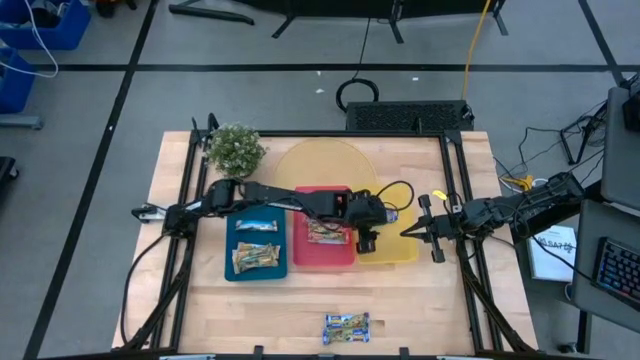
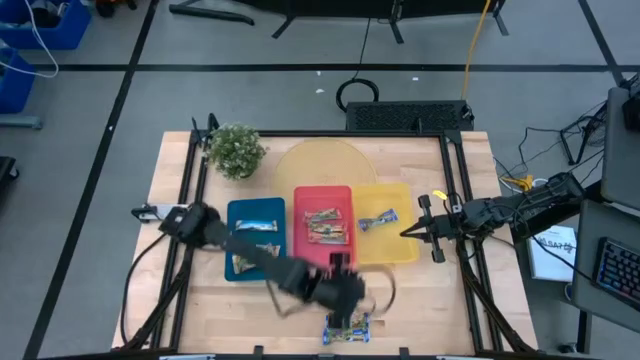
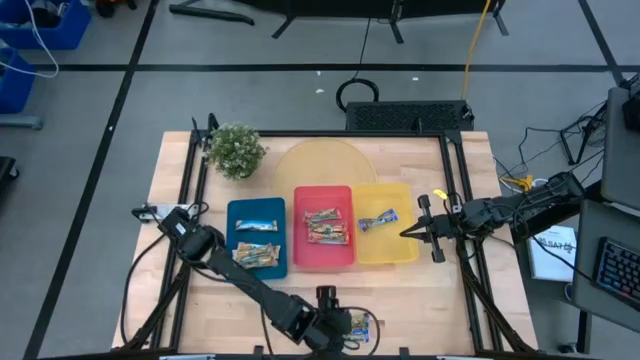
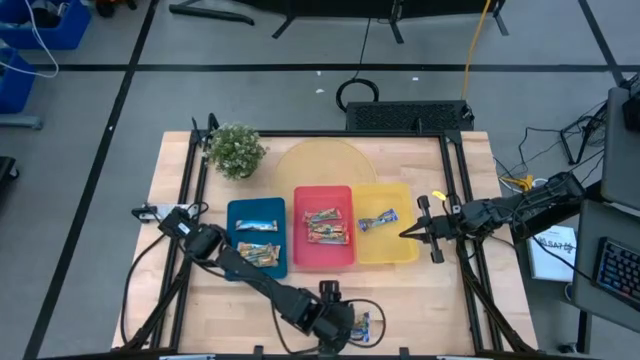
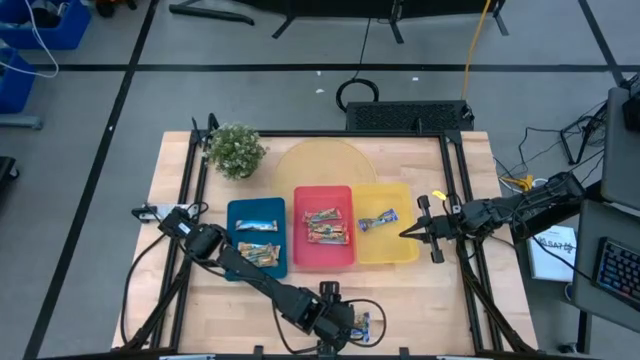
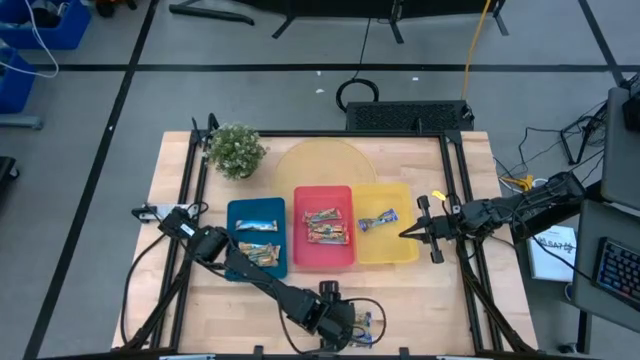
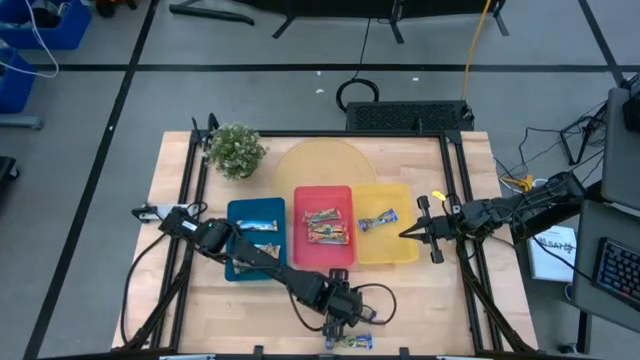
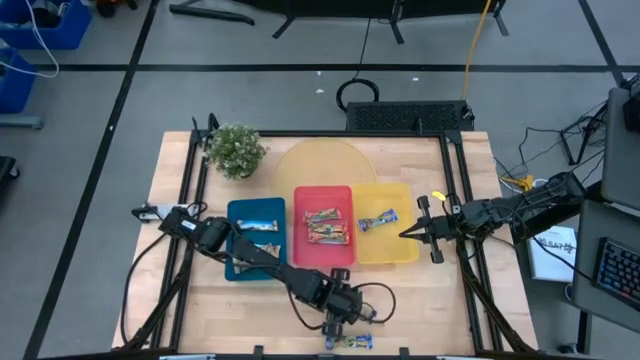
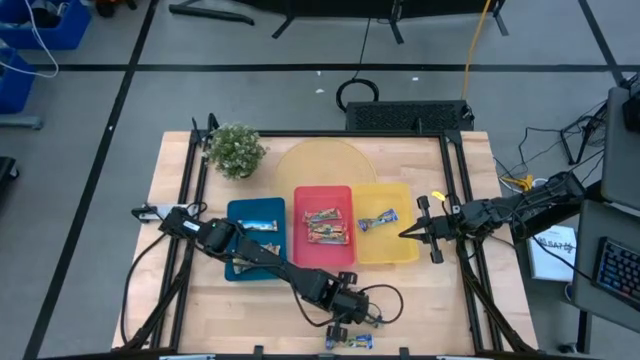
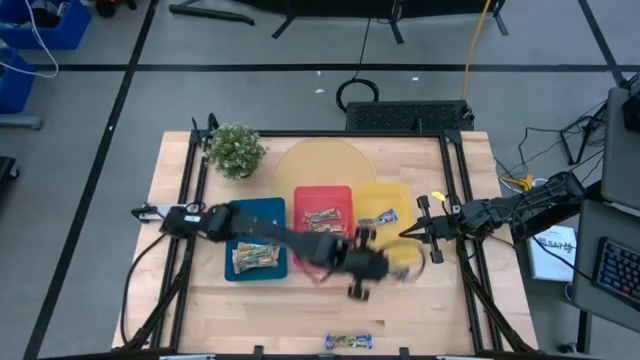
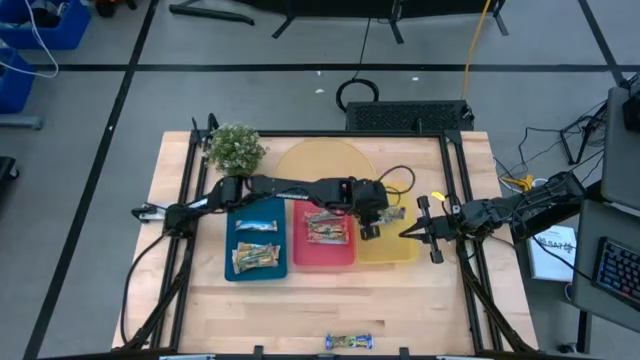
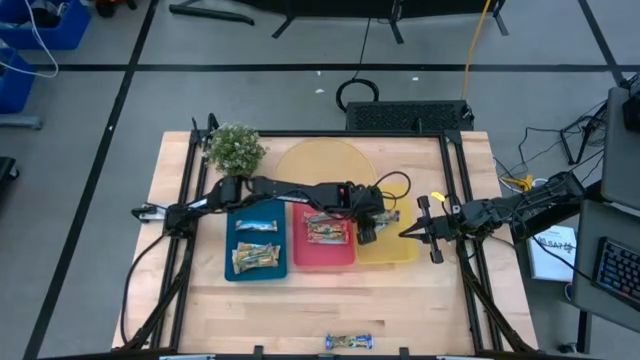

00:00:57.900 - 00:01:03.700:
Task: Pick and place Granola Bars by type
Put the blue granola bar into the yellow bin

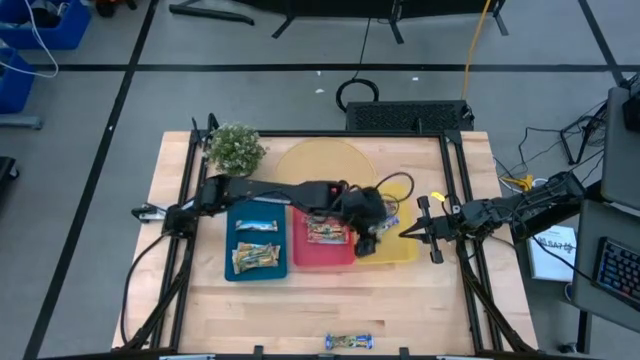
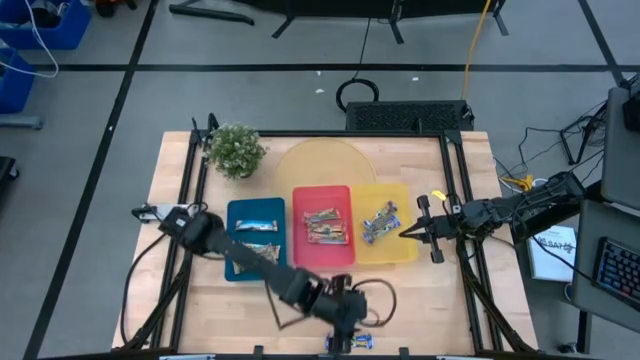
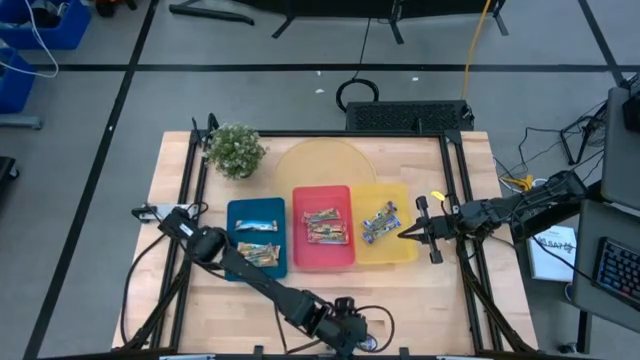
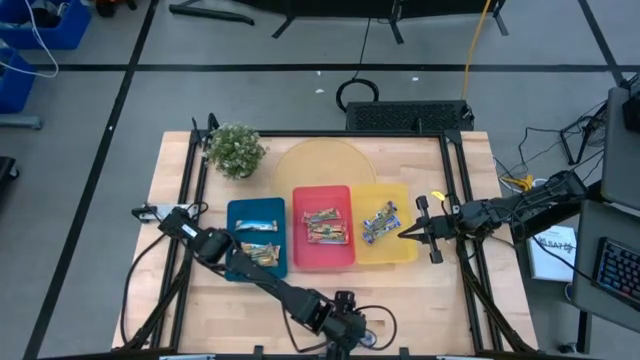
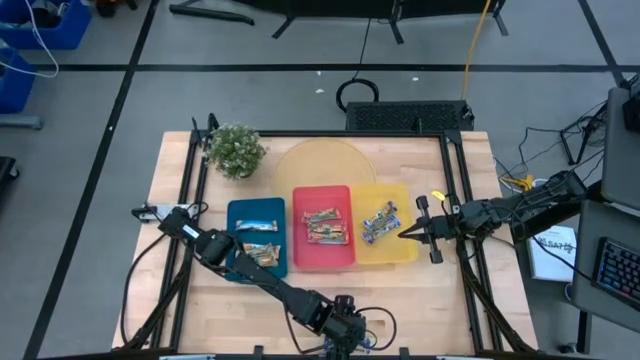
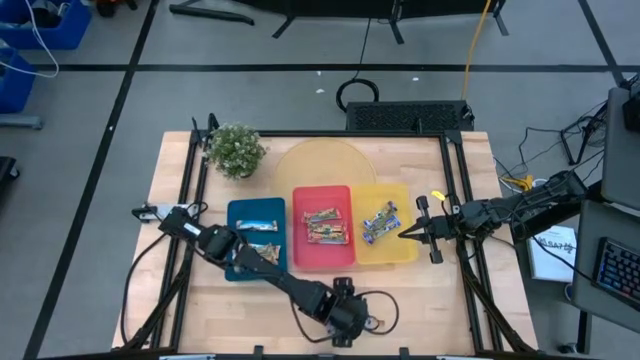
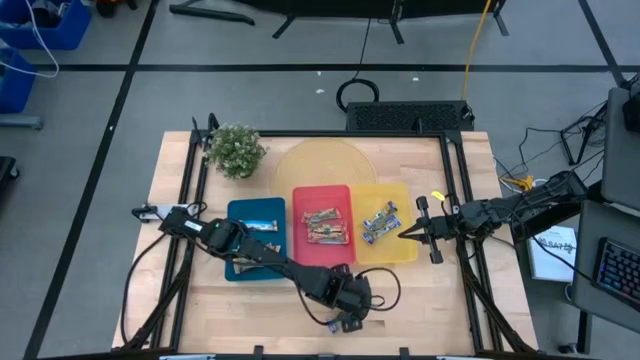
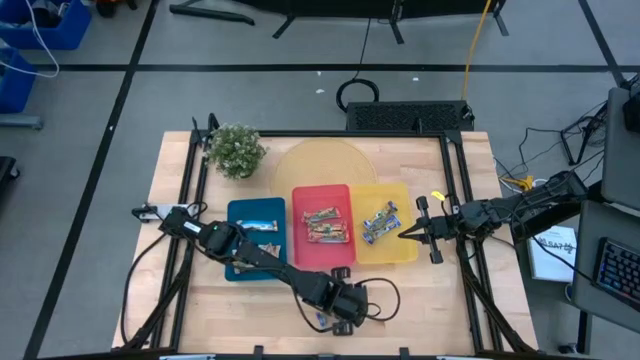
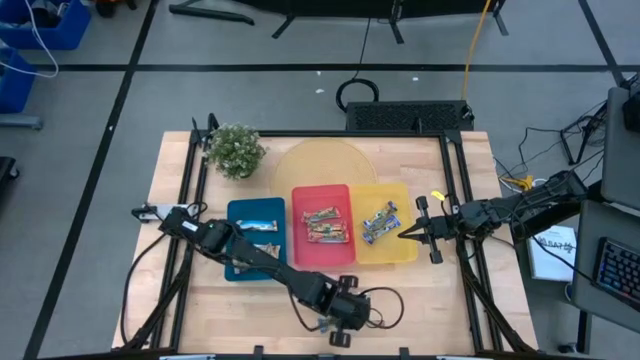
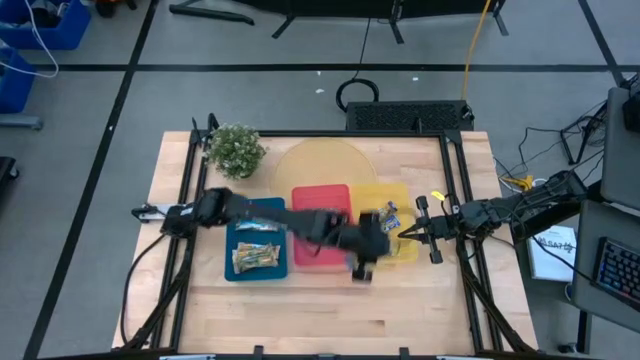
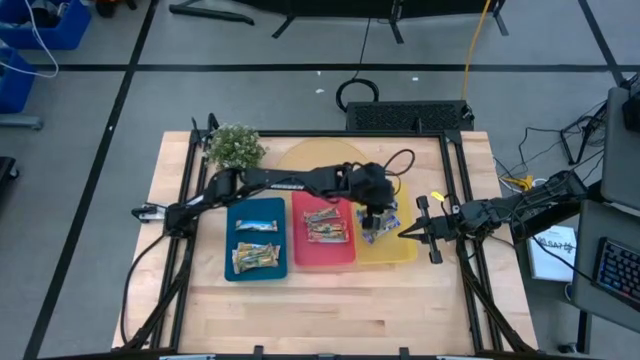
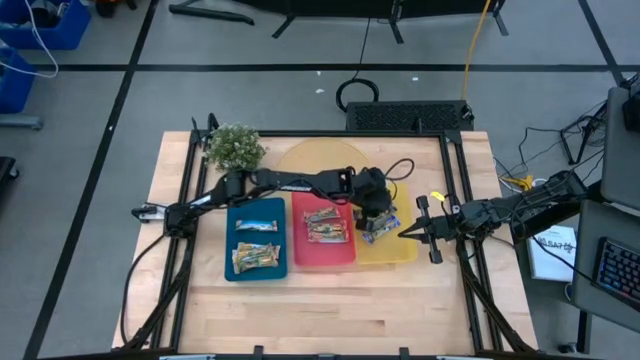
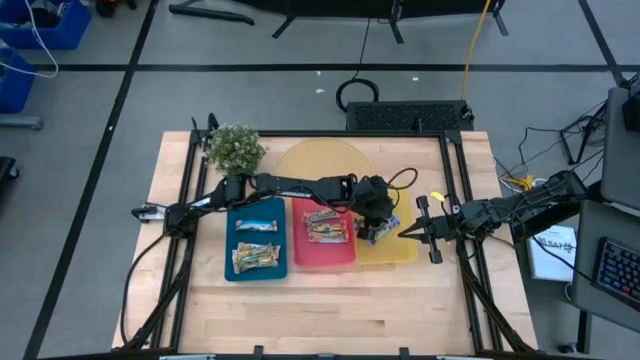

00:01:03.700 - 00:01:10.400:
Put the blue granola bar into the yellow bin

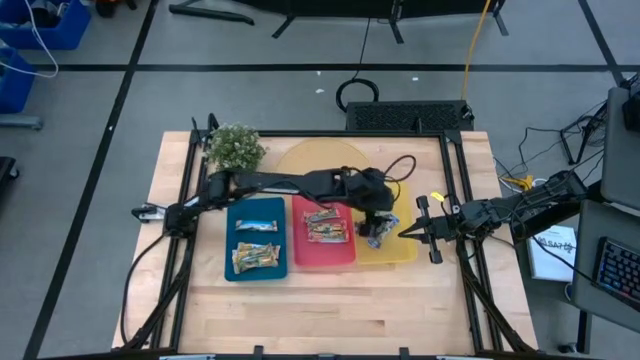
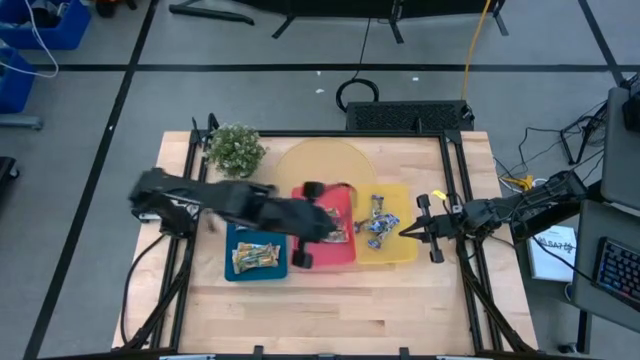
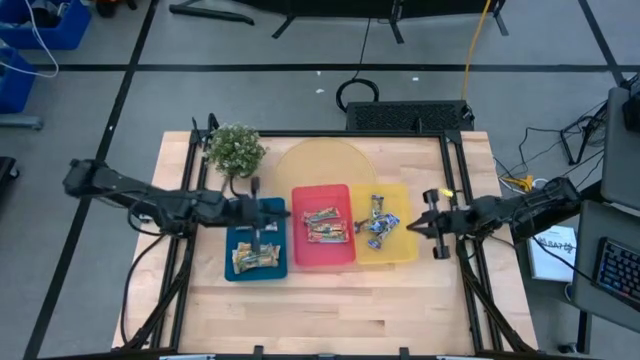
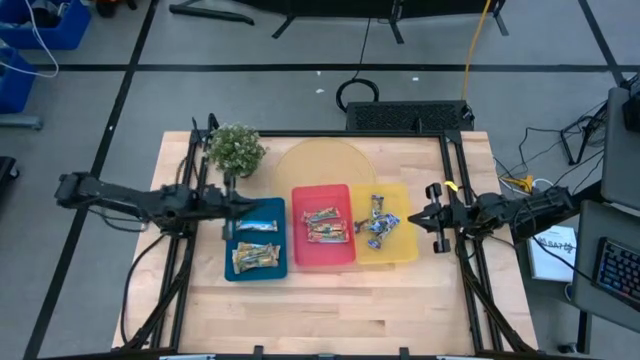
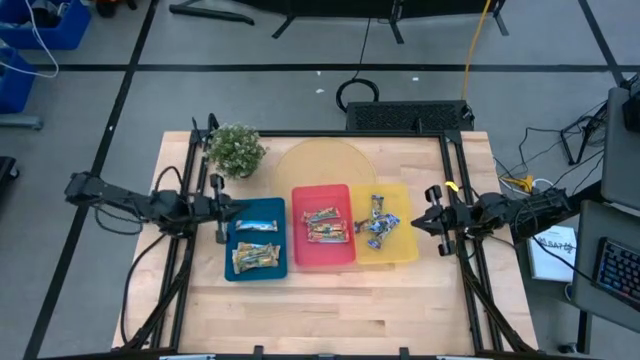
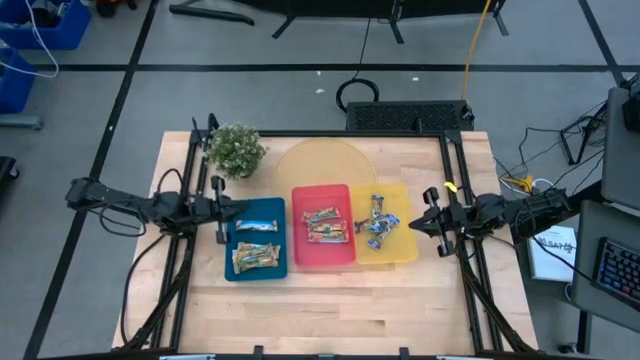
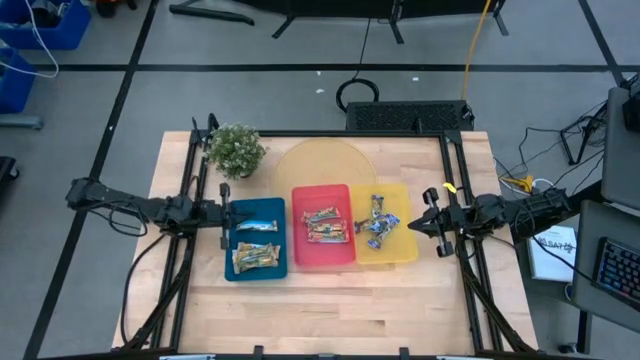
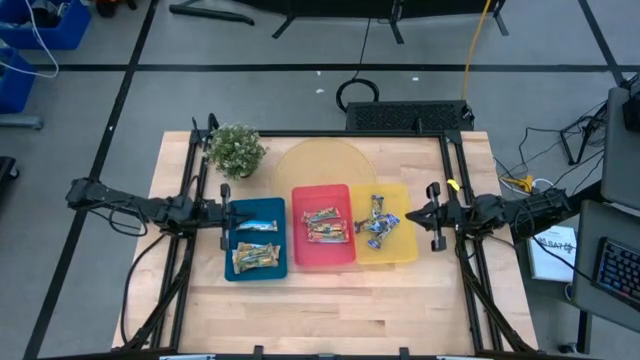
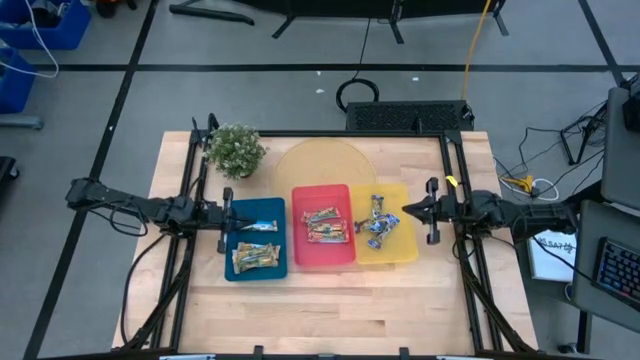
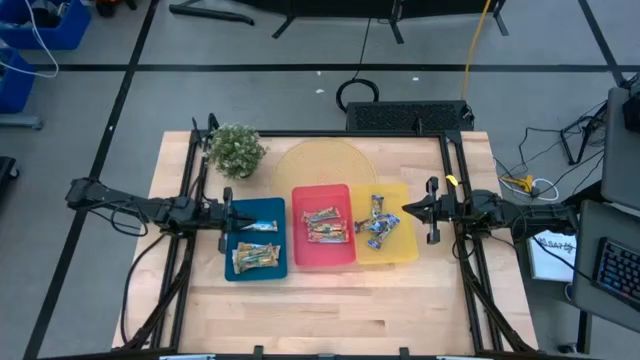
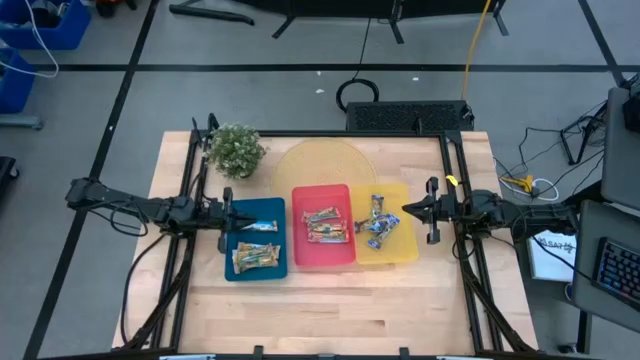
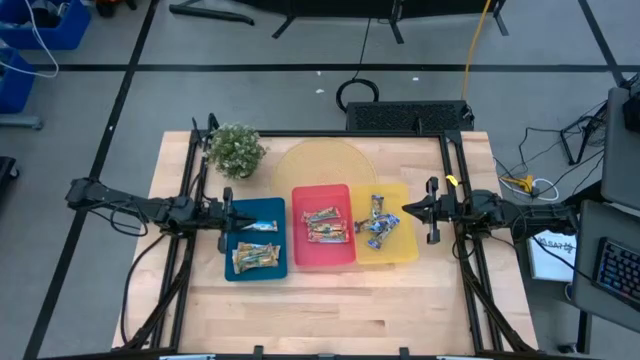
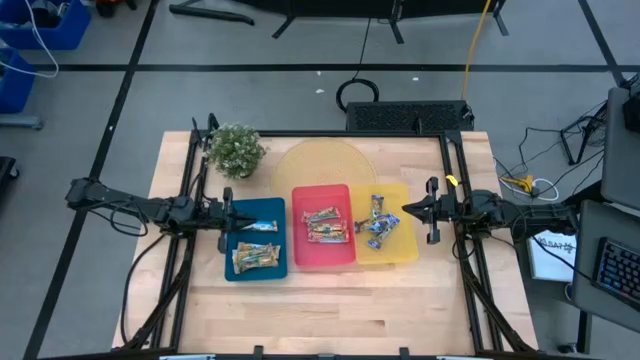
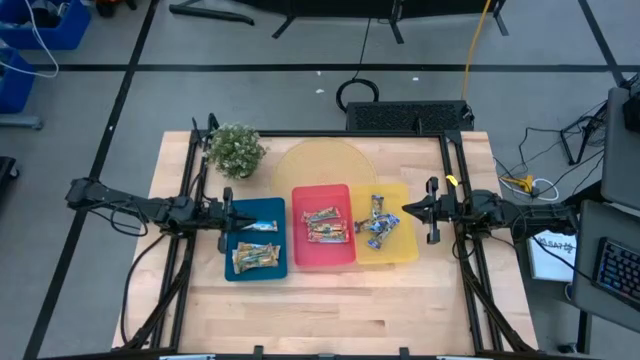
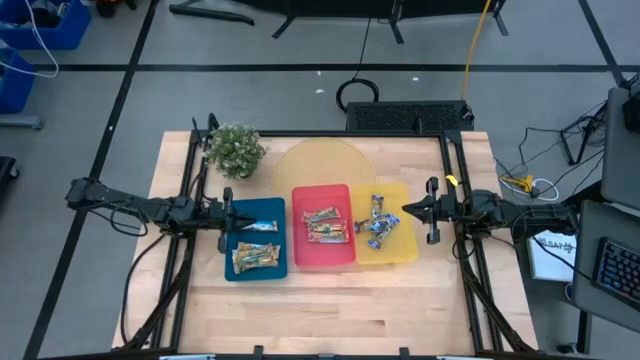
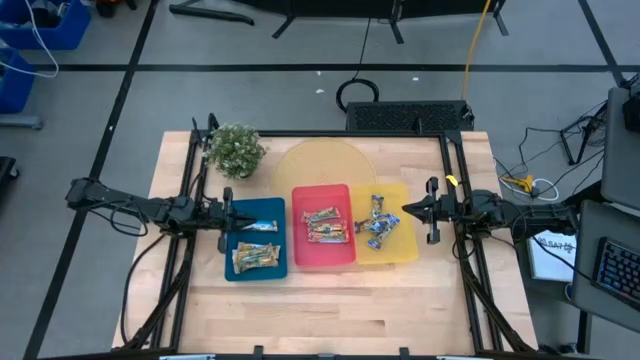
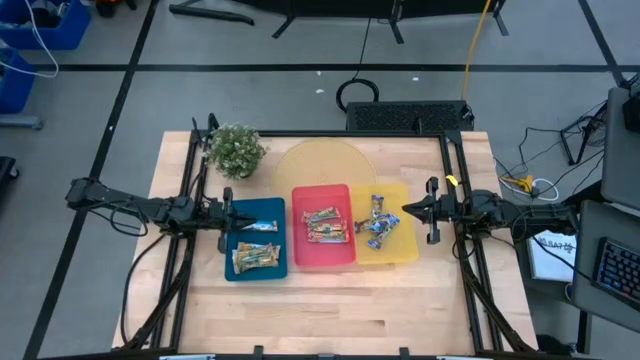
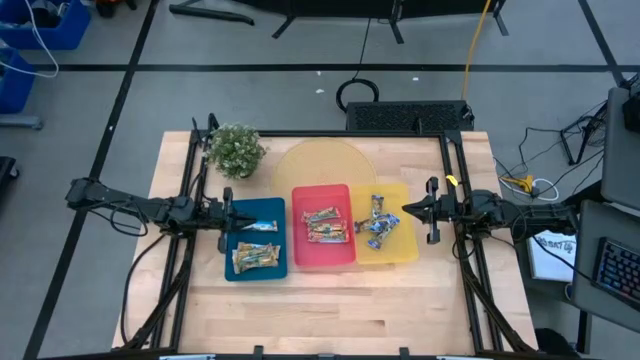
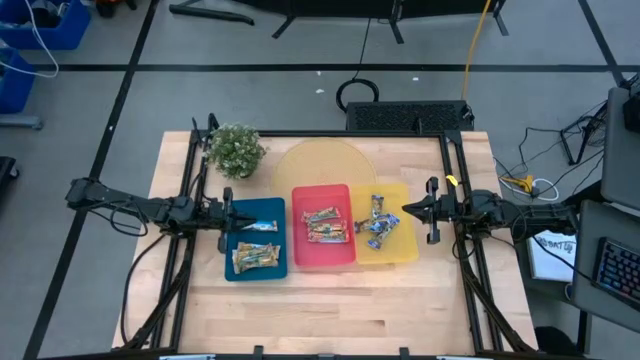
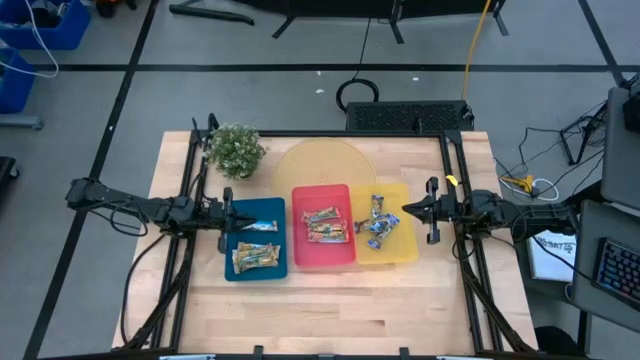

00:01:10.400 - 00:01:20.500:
Return to Home Position
